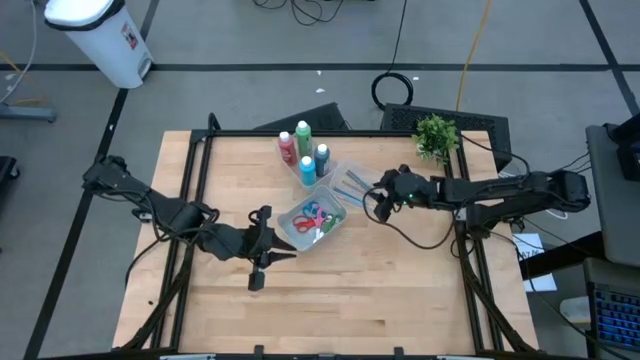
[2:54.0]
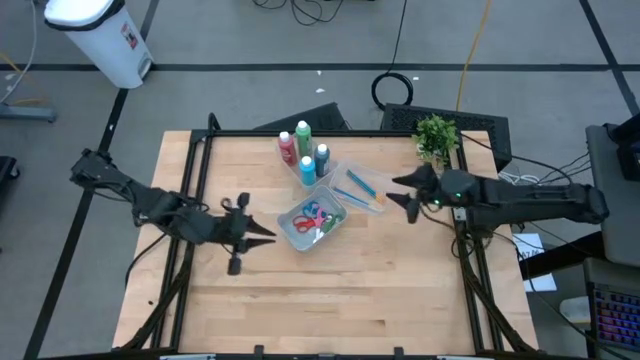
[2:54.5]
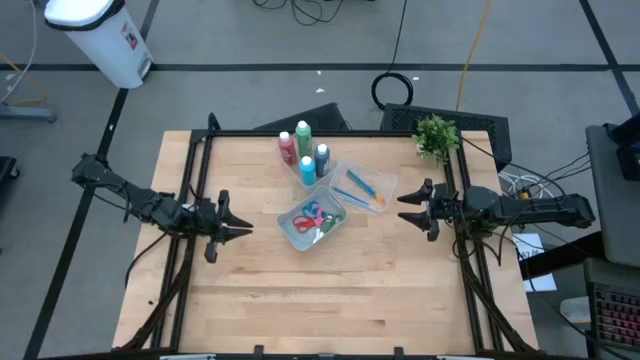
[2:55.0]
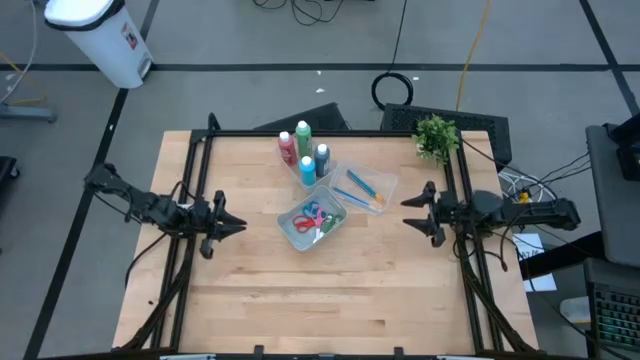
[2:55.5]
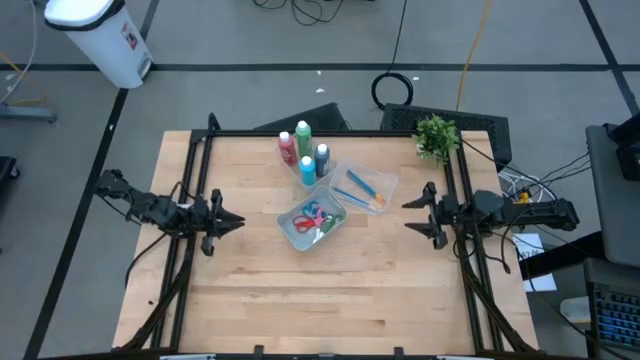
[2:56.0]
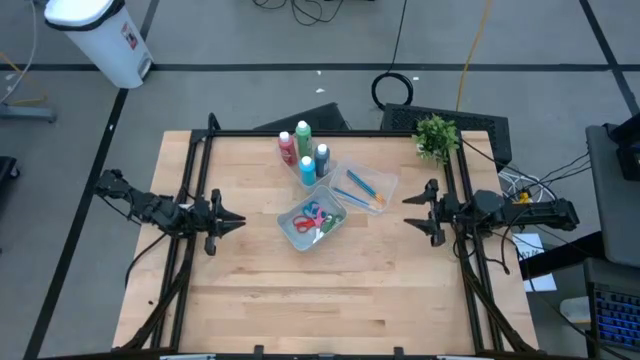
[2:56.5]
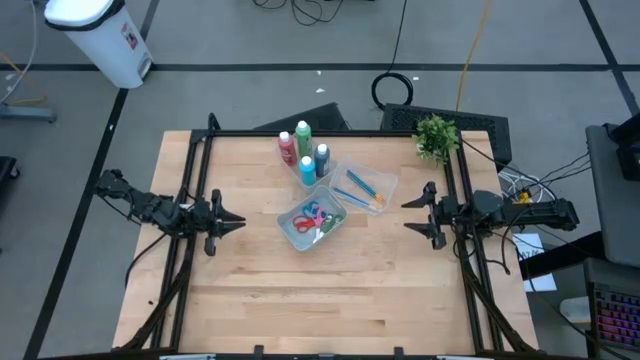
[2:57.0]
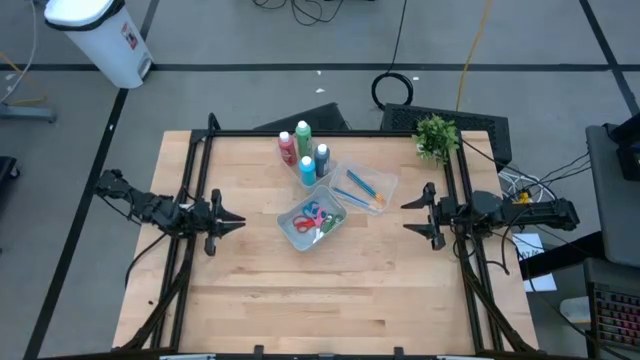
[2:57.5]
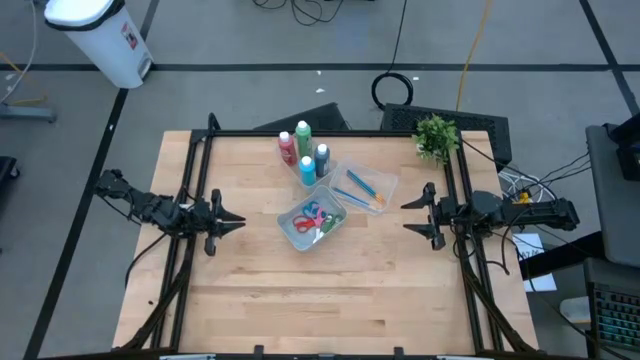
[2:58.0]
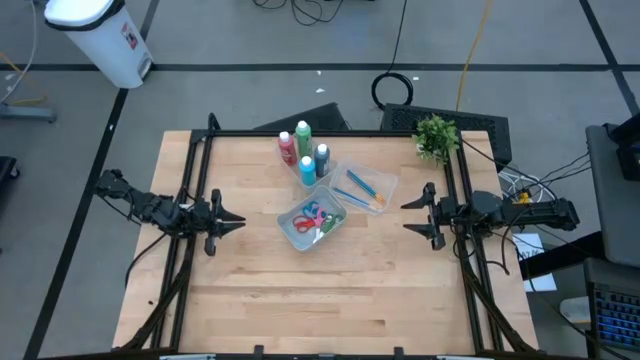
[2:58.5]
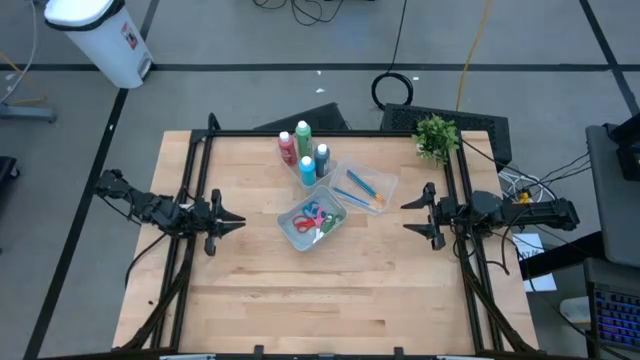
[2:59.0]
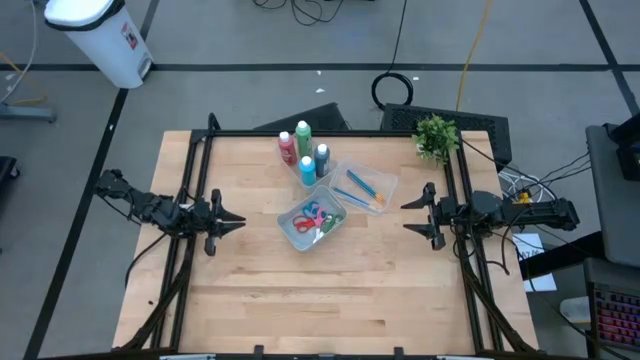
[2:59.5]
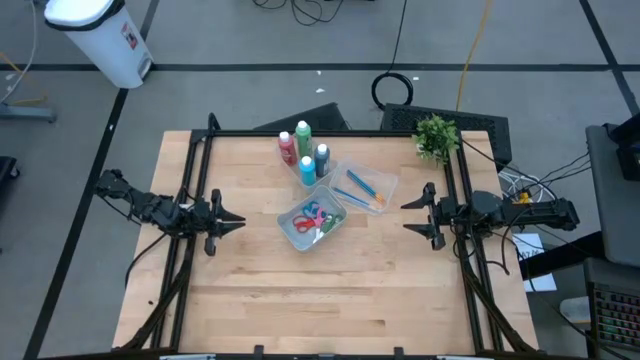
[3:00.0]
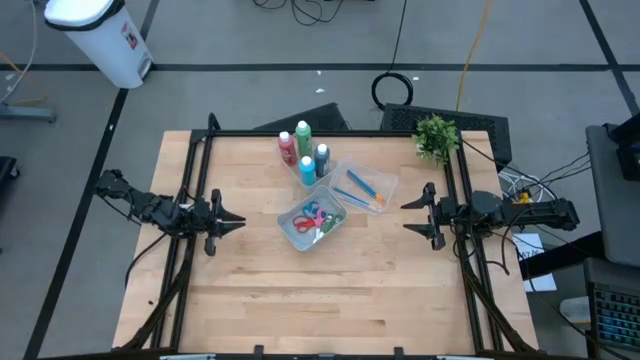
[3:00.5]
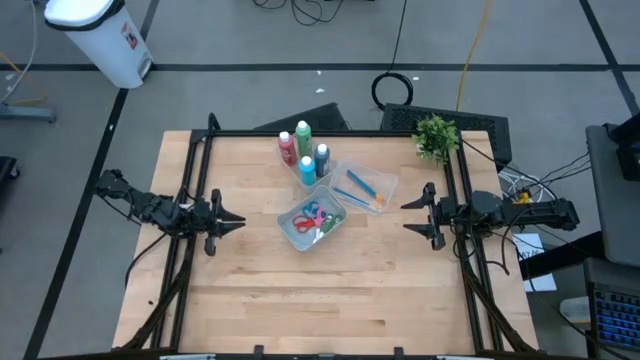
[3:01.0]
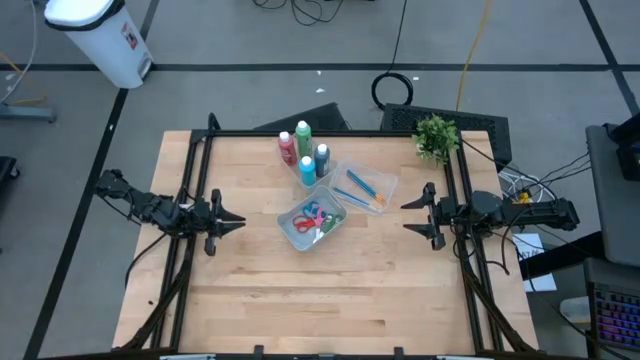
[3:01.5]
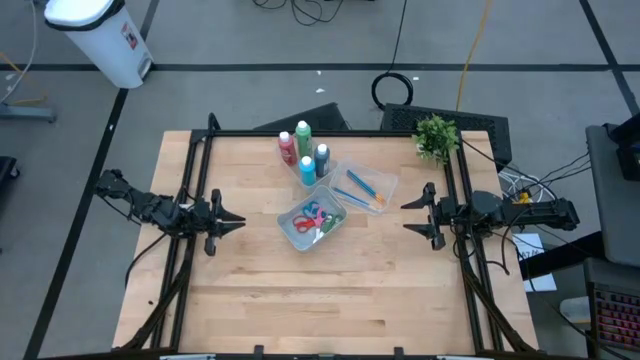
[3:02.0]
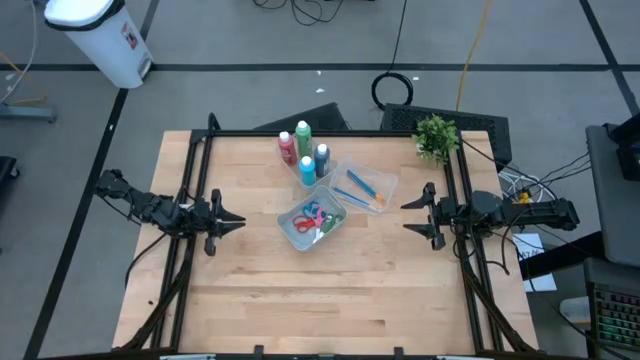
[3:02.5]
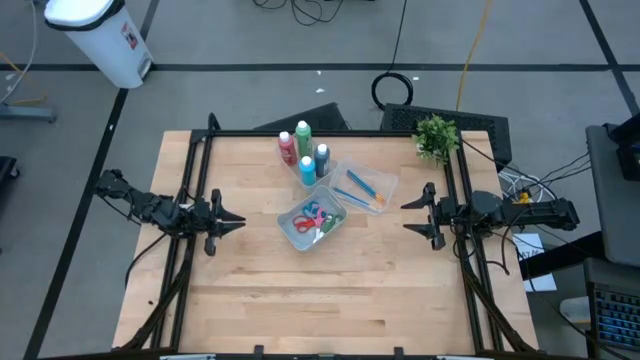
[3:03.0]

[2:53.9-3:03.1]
Task: Pick & Place Paint Supplies
Return to Home Position

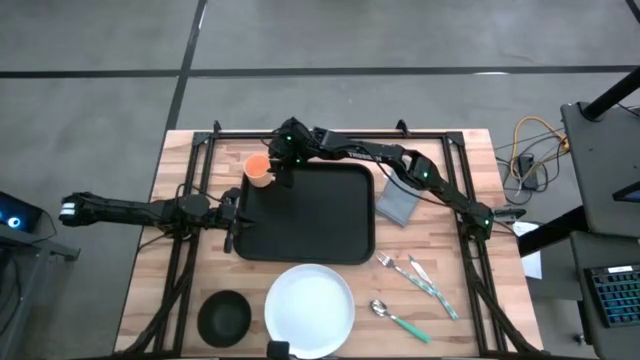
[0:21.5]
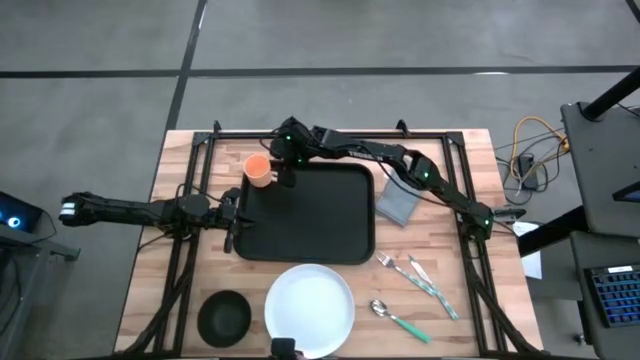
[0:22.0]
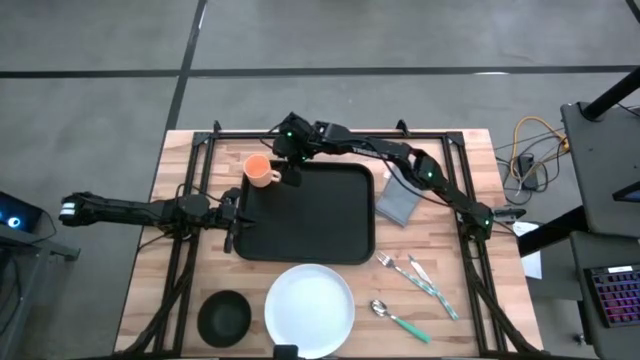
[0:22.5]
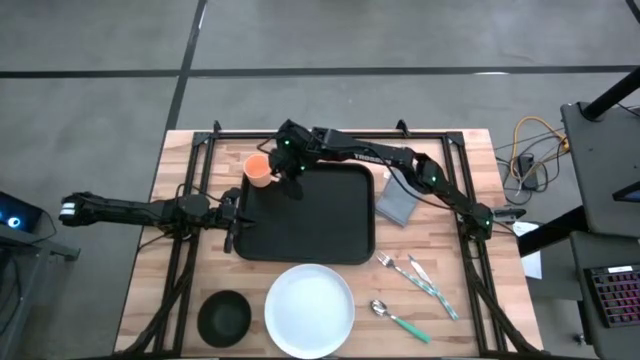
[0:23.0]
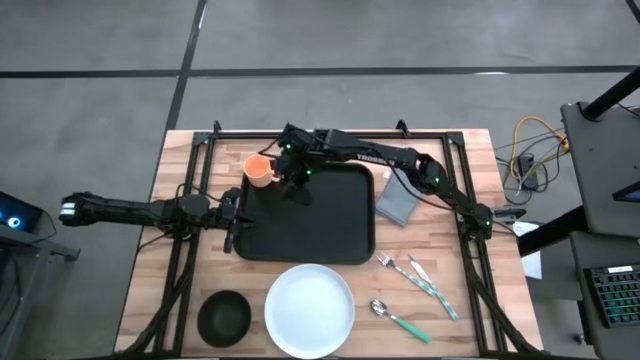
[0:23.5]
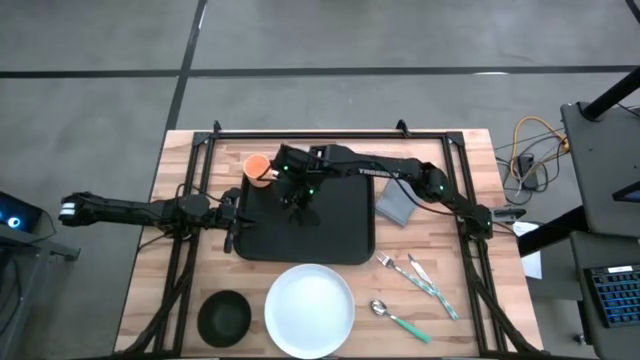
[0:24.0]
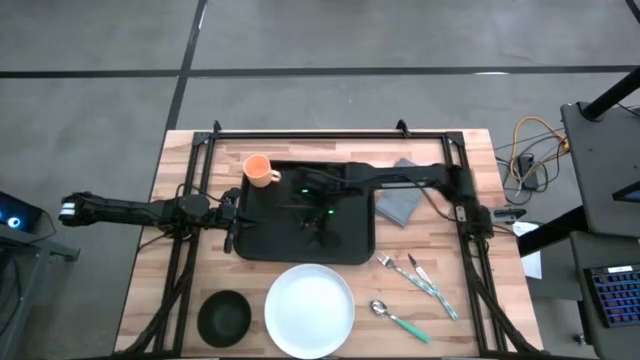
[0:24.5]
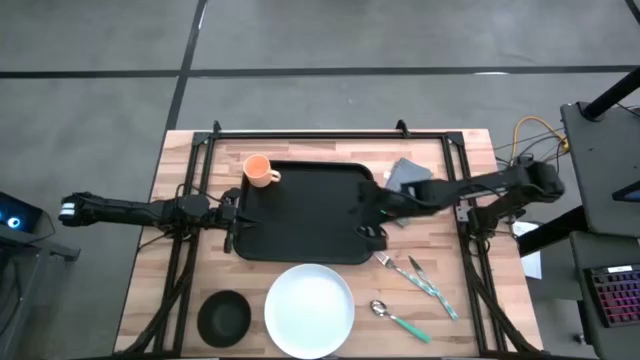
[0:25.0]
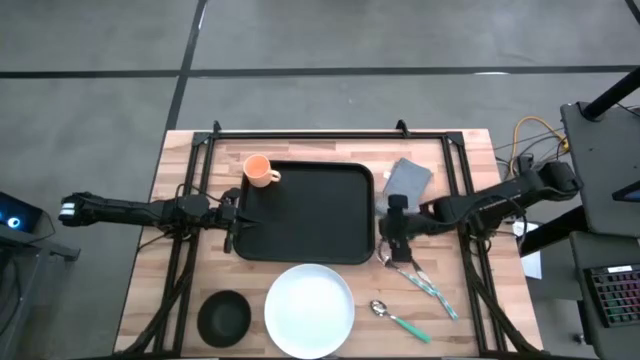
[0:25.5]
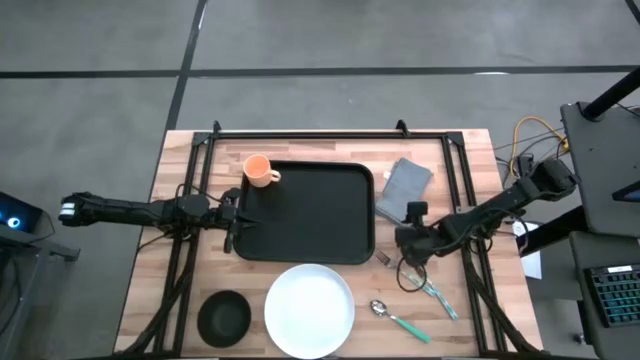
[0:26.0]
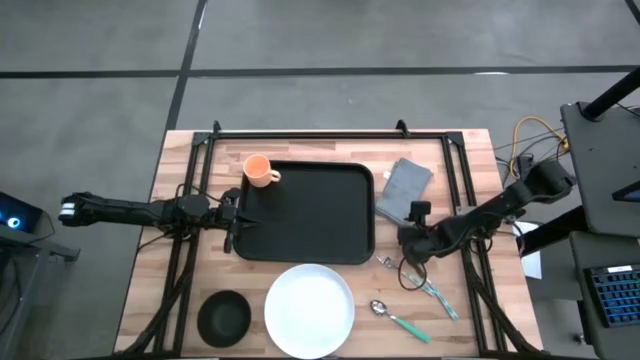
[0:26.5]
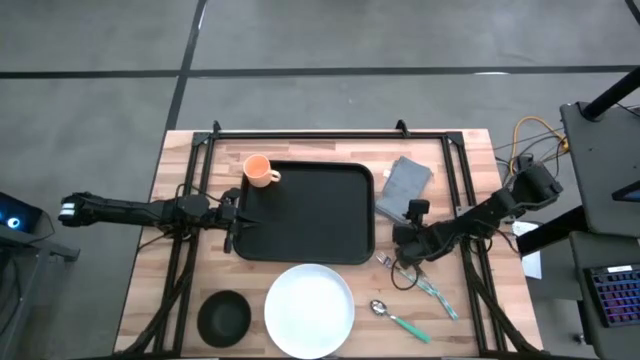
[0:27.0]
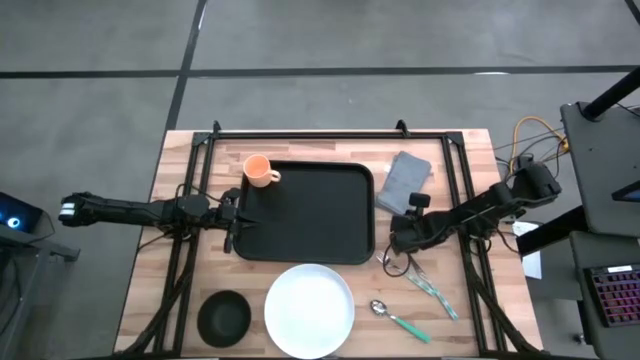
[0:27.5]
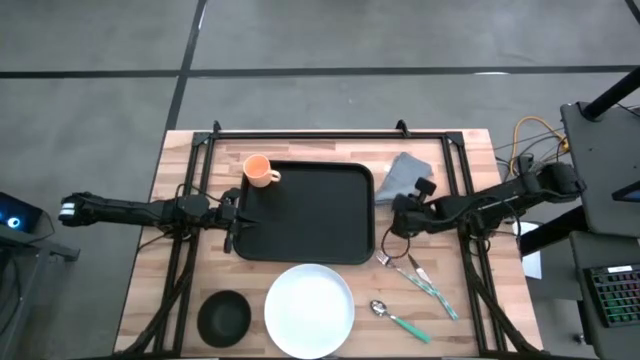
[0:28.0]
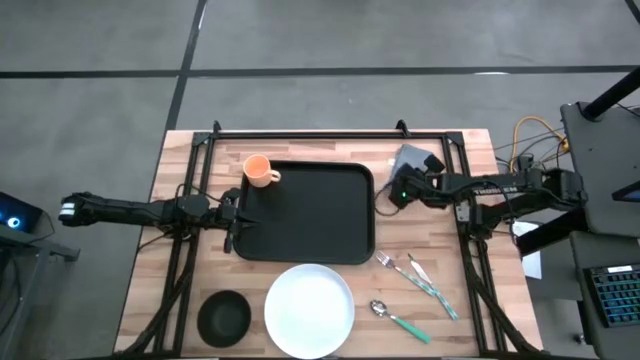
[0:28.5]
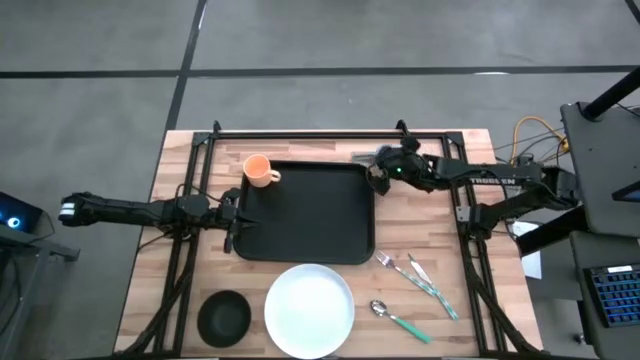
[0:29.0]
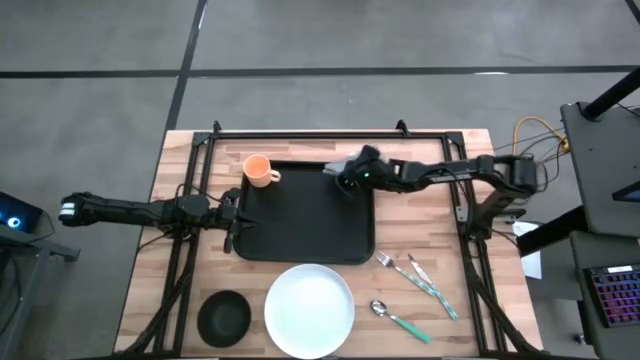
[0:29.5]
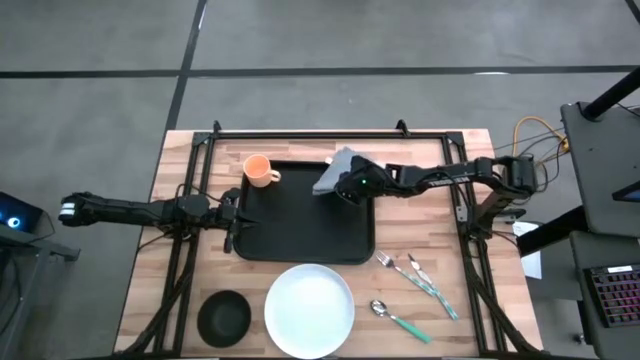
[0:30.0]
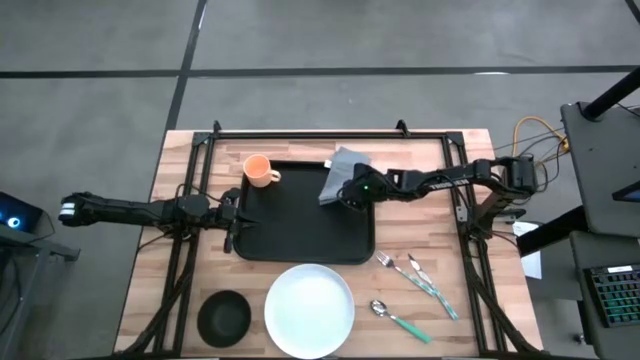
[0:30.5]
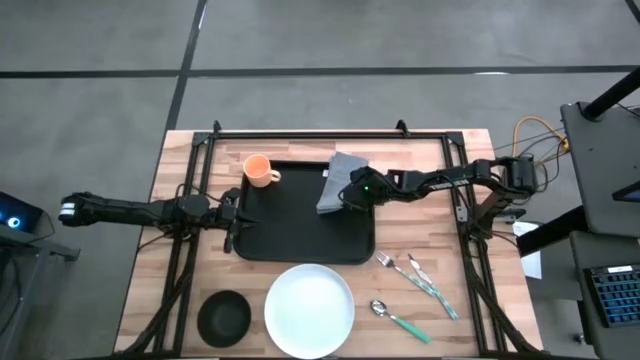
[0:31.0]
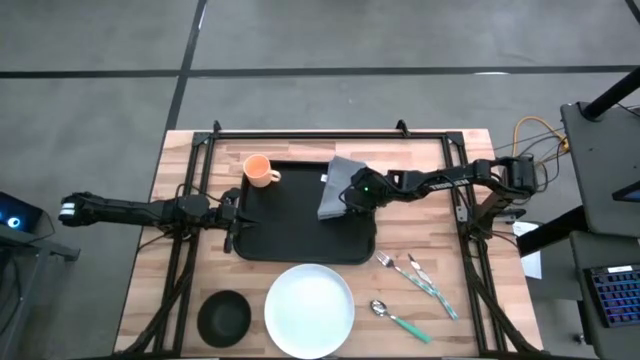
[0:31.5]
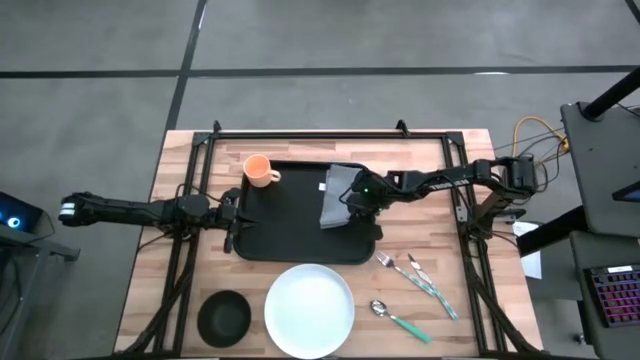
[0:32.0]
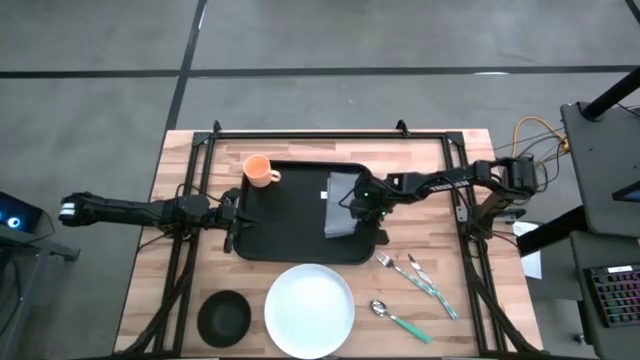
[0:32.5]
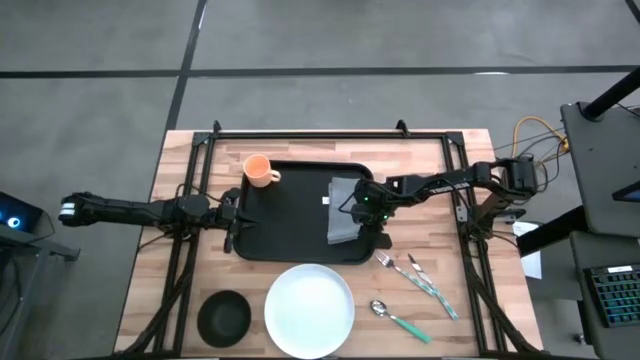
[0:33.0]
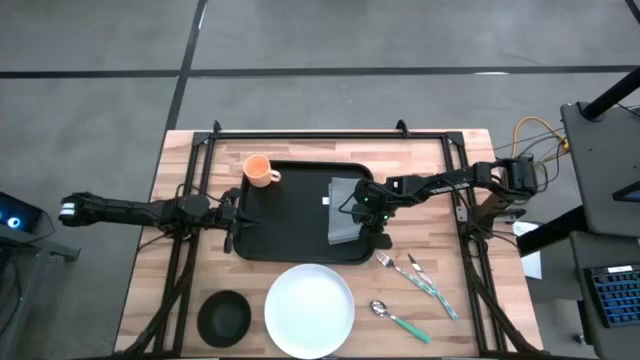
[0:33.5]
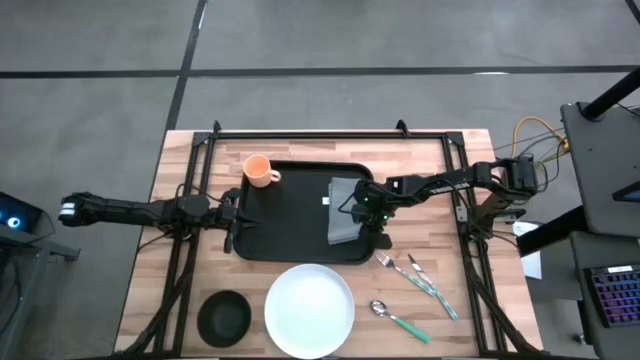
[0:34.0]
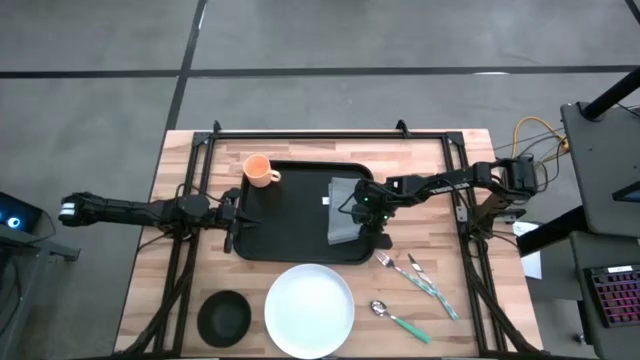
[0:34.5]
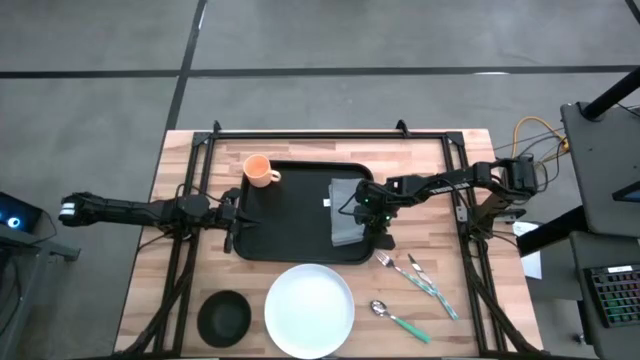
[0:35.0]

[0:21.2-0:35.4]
Task: Set up tray
Put the gray napkin on the right of the black tray
